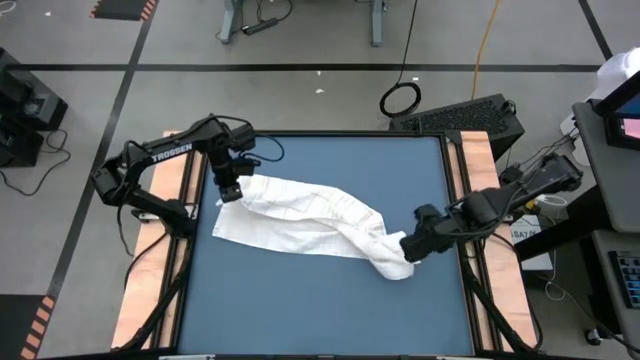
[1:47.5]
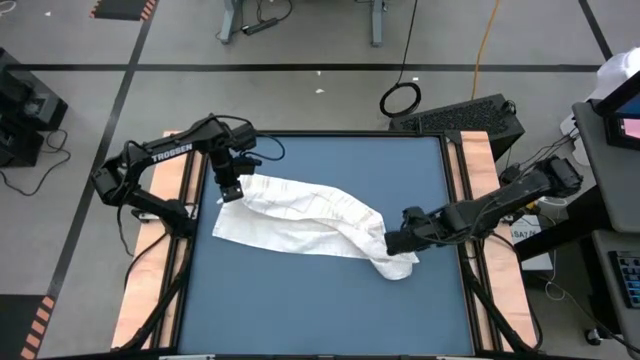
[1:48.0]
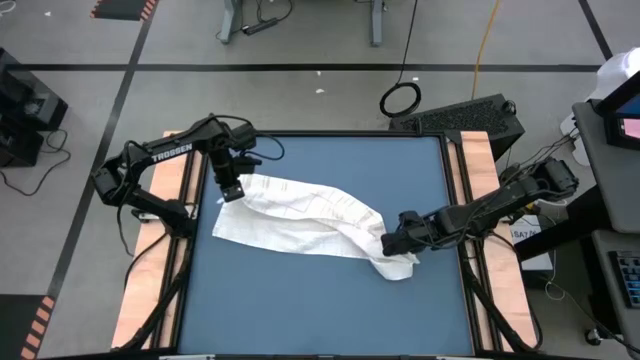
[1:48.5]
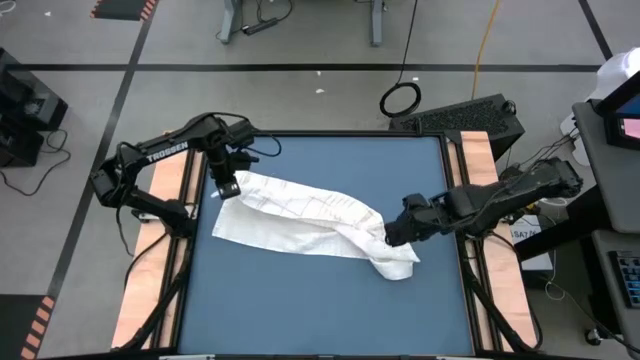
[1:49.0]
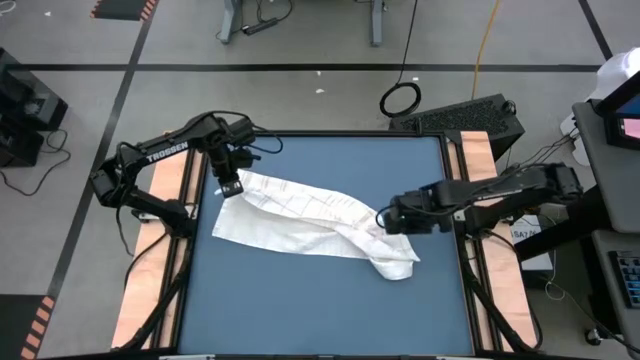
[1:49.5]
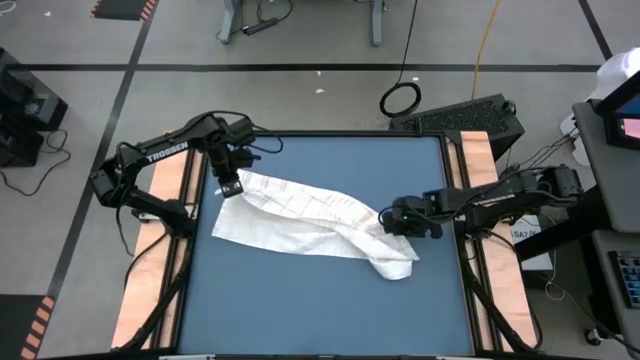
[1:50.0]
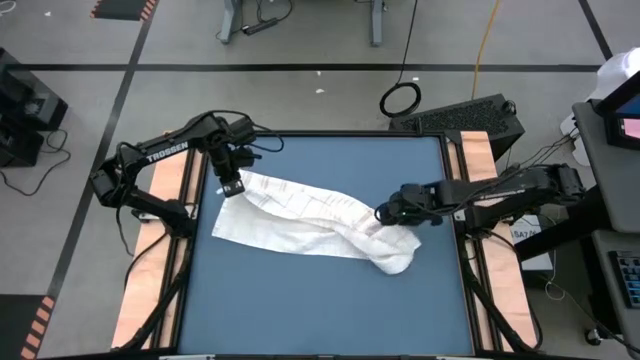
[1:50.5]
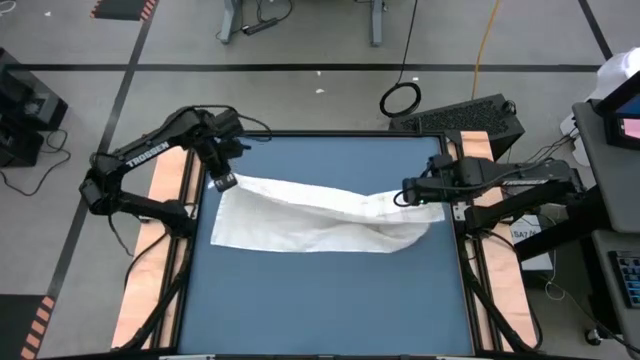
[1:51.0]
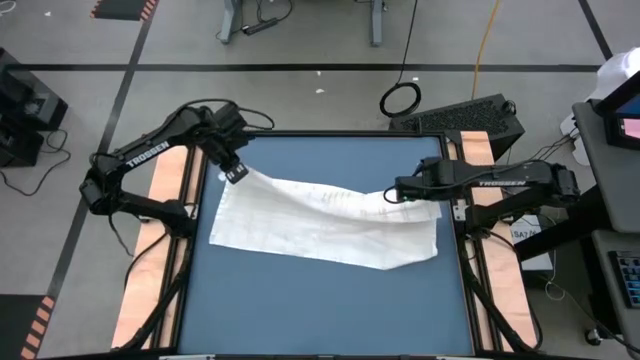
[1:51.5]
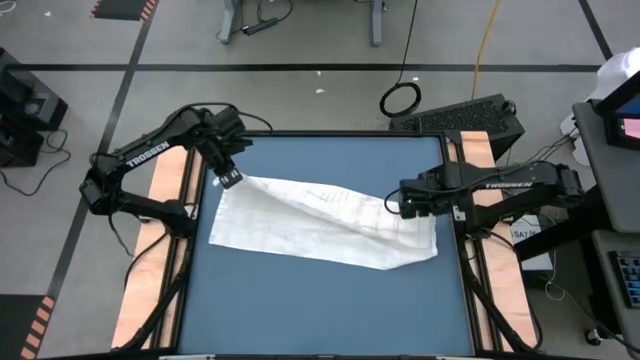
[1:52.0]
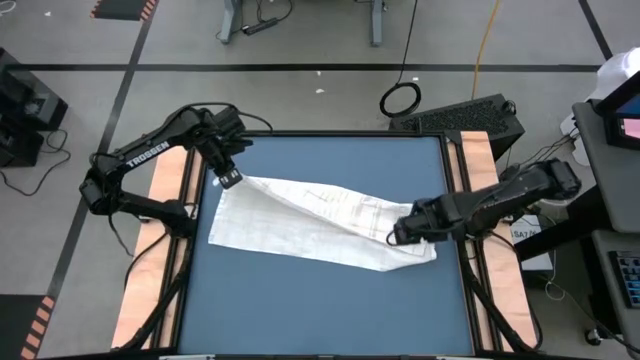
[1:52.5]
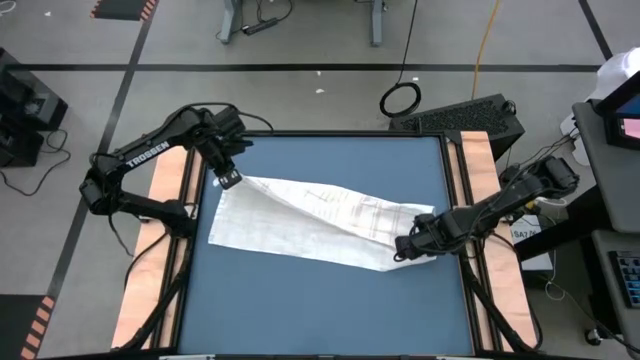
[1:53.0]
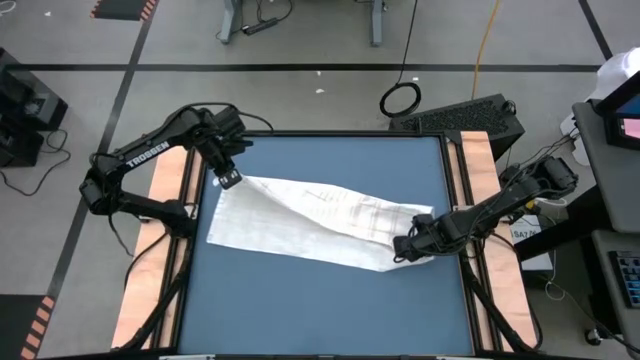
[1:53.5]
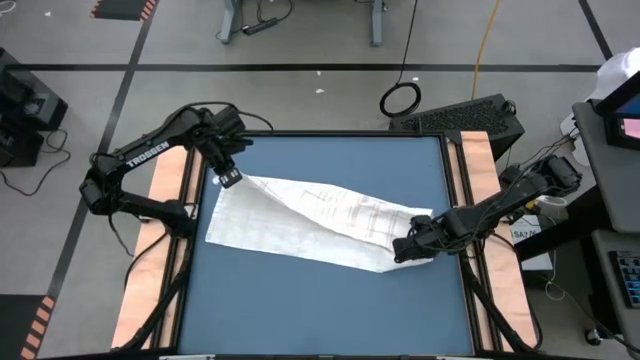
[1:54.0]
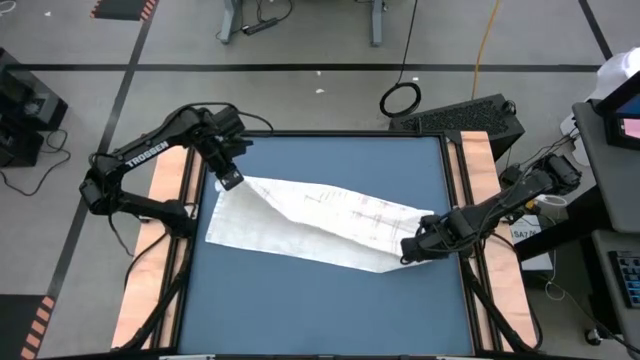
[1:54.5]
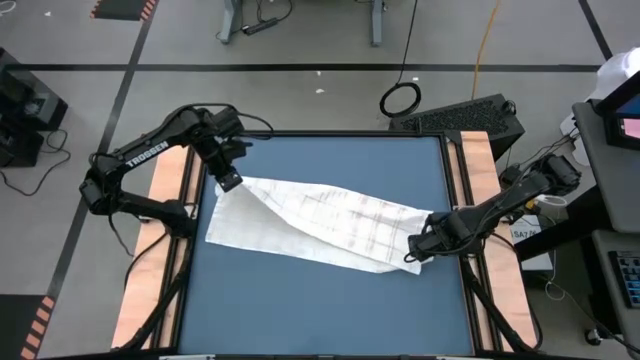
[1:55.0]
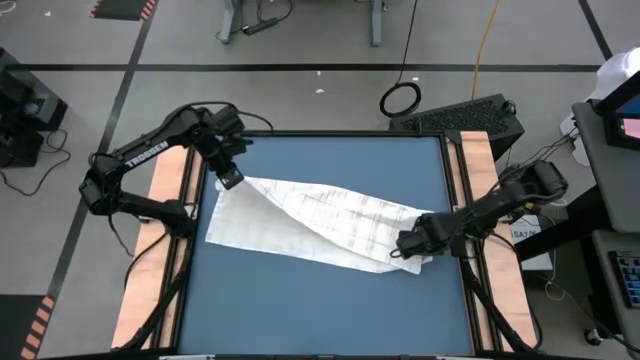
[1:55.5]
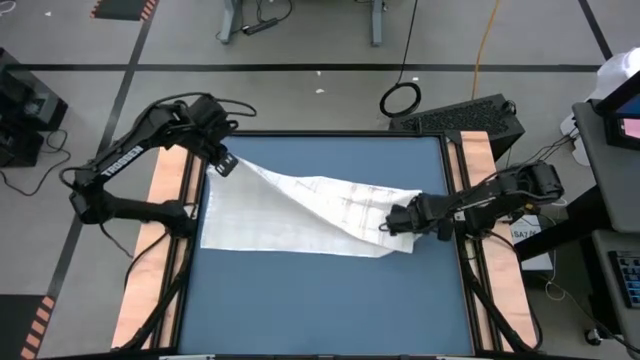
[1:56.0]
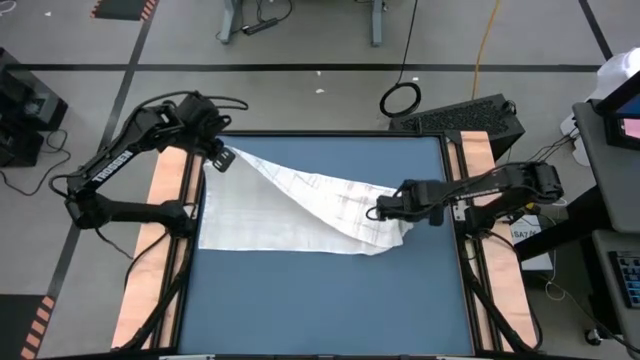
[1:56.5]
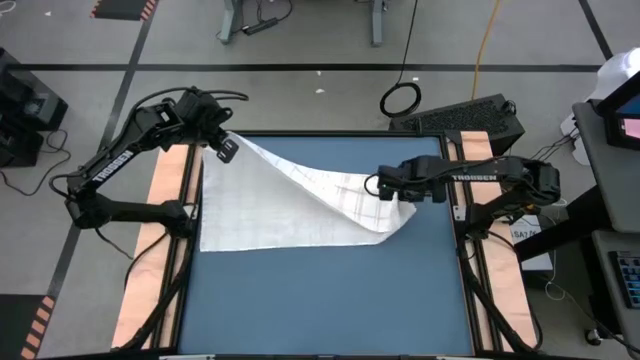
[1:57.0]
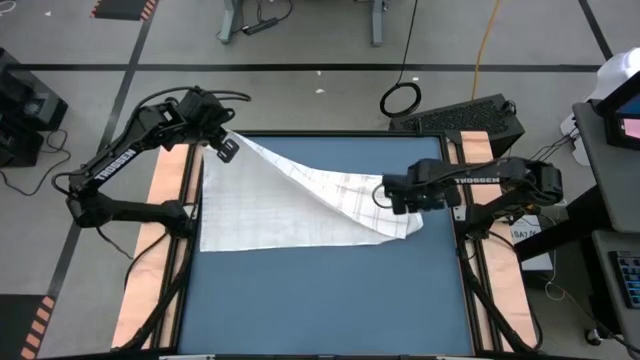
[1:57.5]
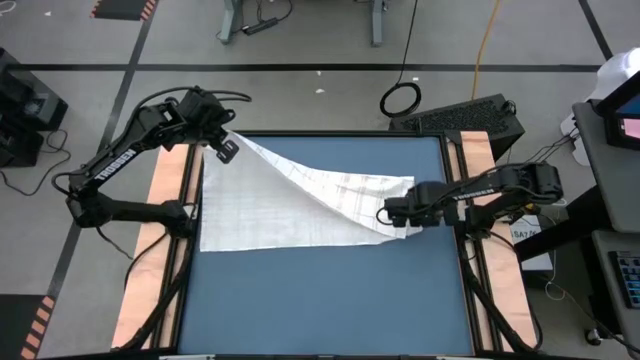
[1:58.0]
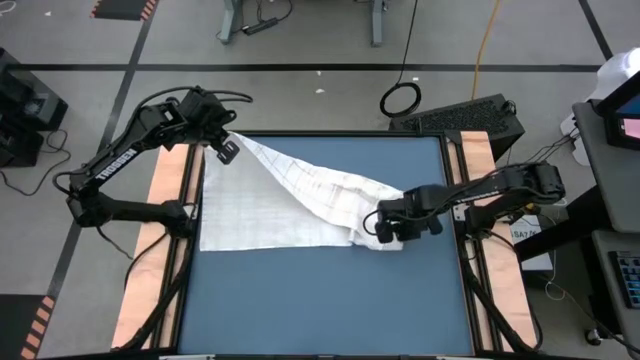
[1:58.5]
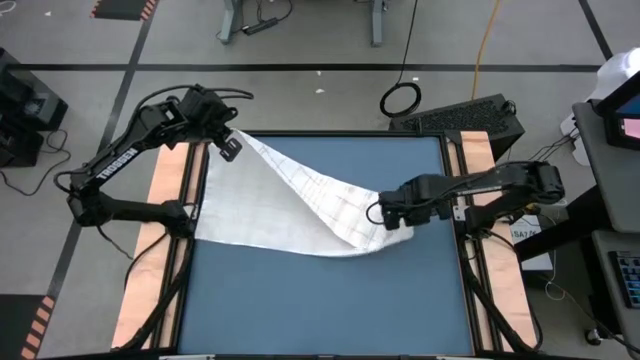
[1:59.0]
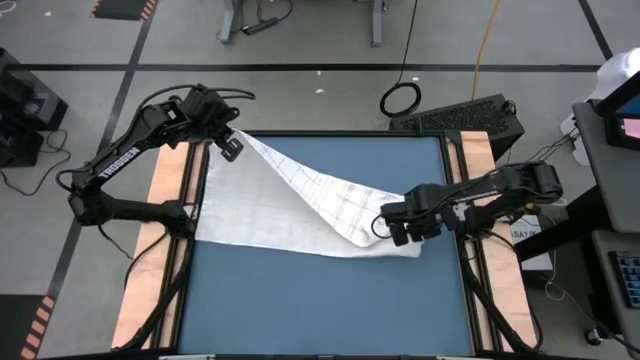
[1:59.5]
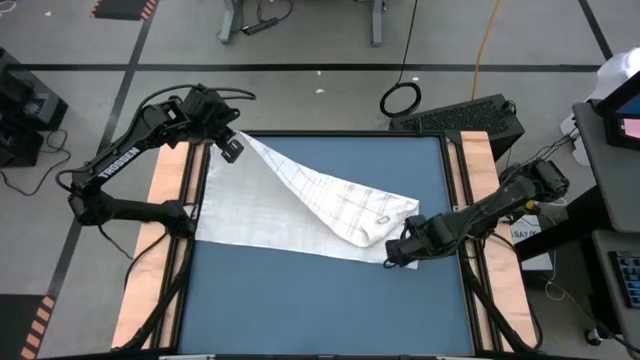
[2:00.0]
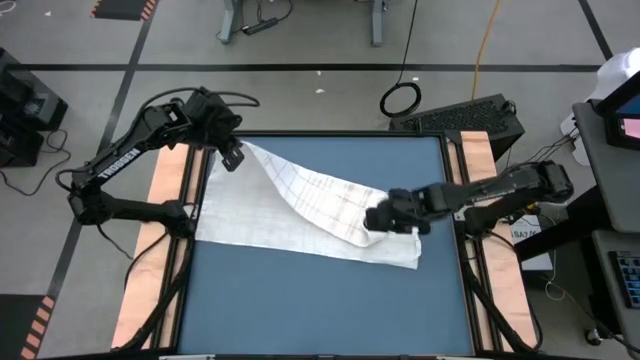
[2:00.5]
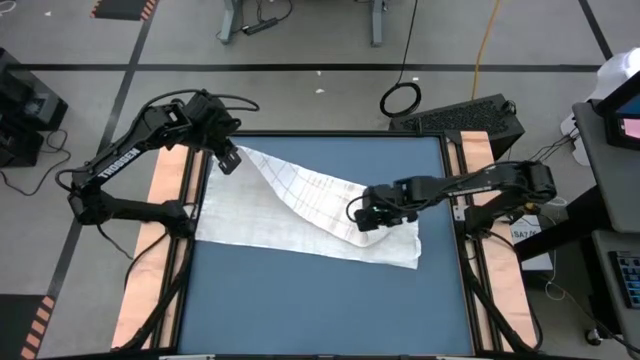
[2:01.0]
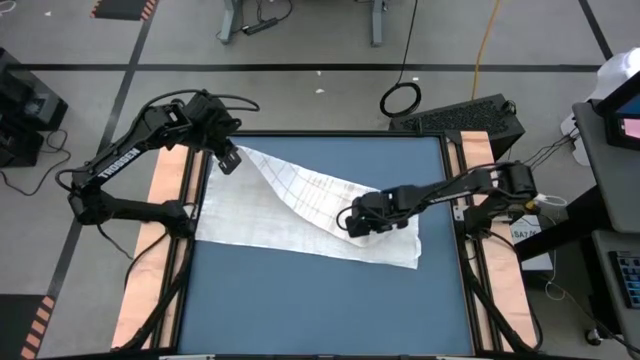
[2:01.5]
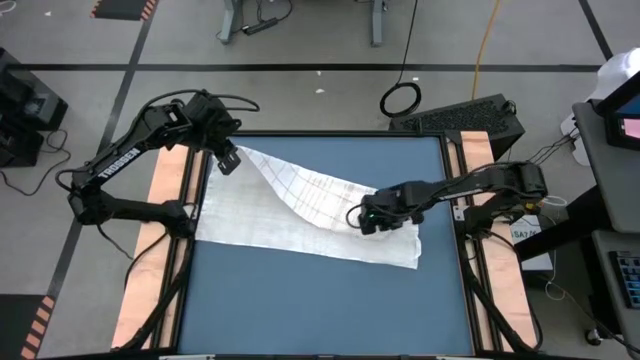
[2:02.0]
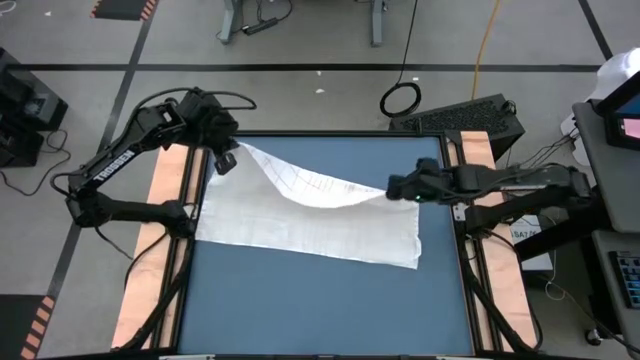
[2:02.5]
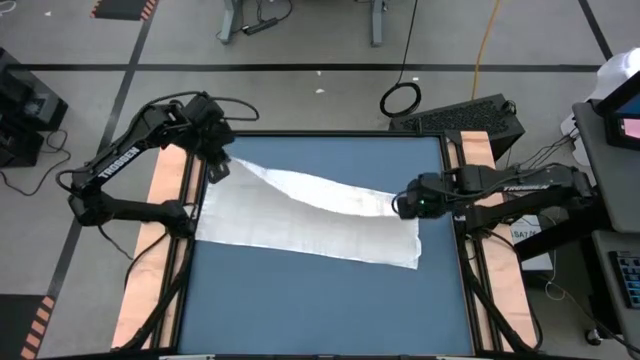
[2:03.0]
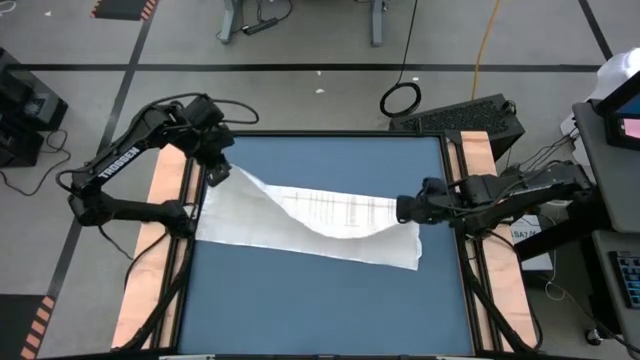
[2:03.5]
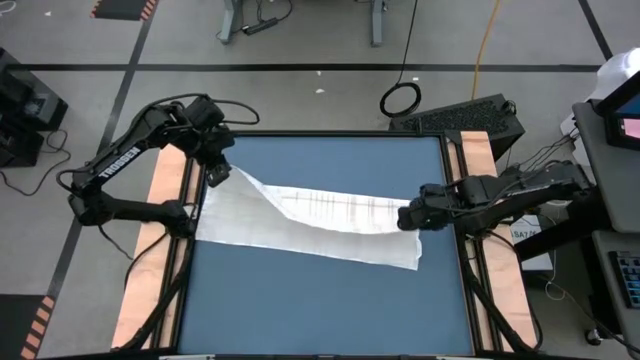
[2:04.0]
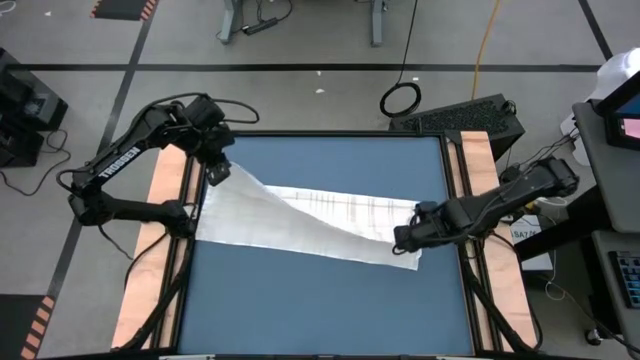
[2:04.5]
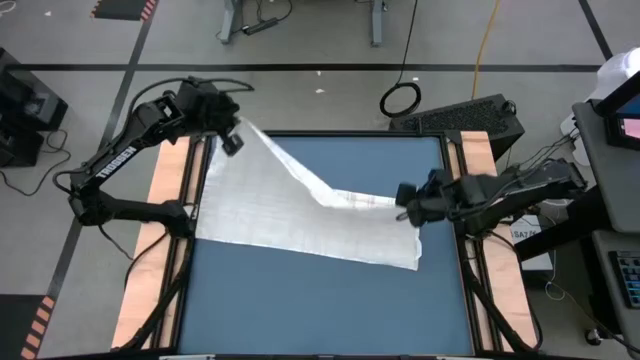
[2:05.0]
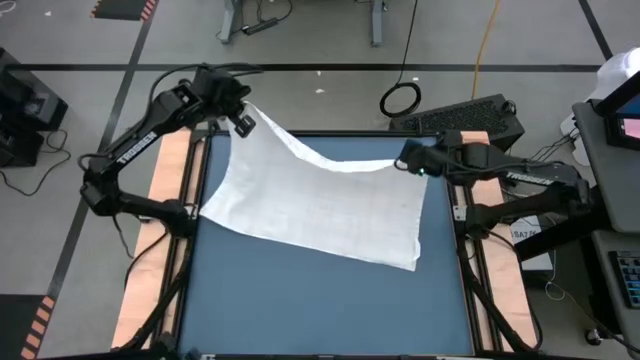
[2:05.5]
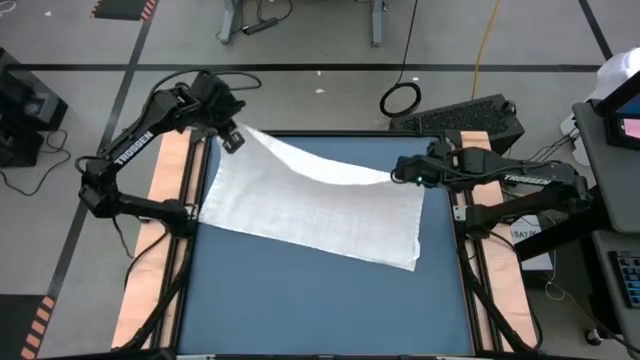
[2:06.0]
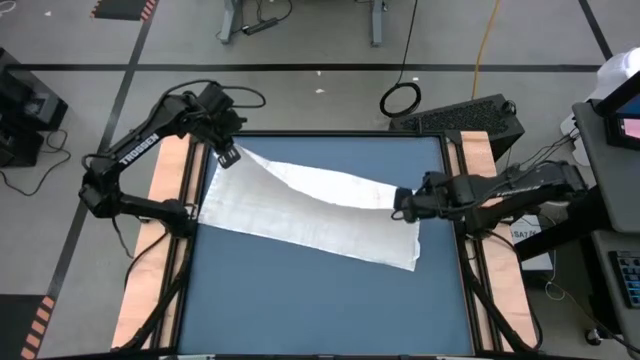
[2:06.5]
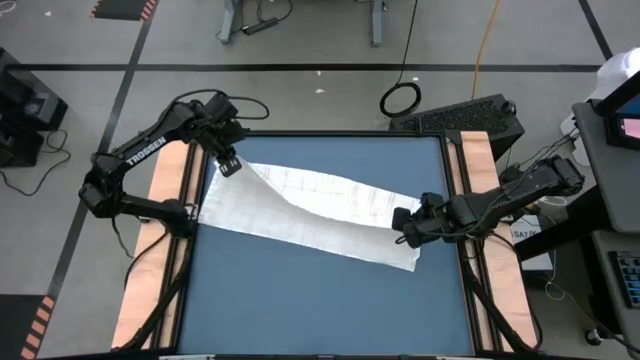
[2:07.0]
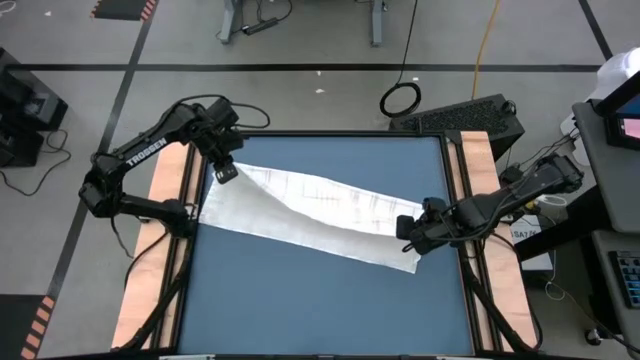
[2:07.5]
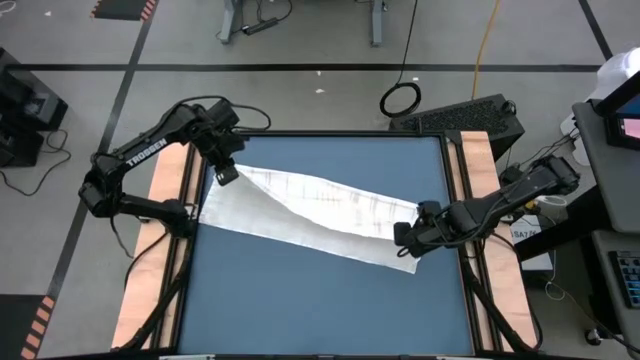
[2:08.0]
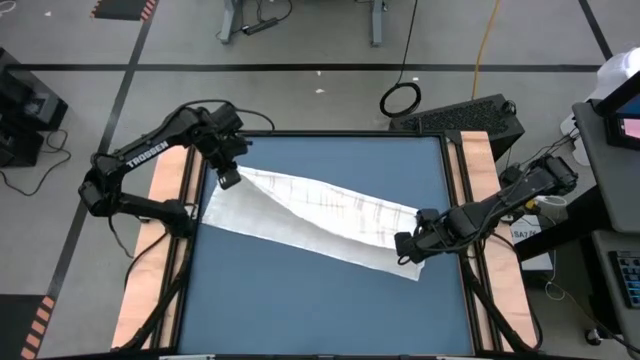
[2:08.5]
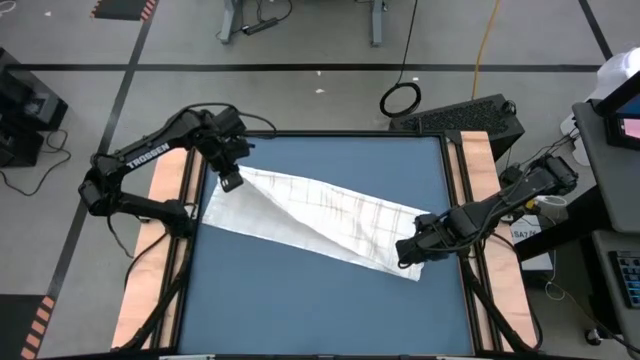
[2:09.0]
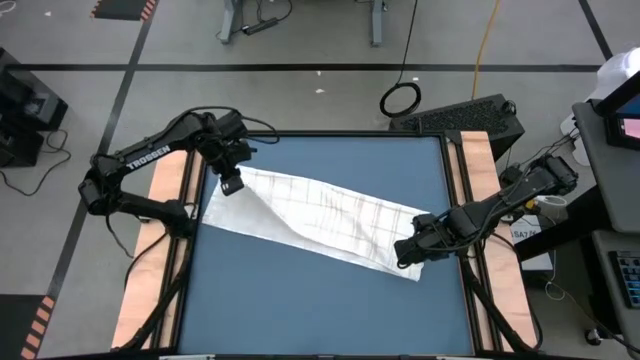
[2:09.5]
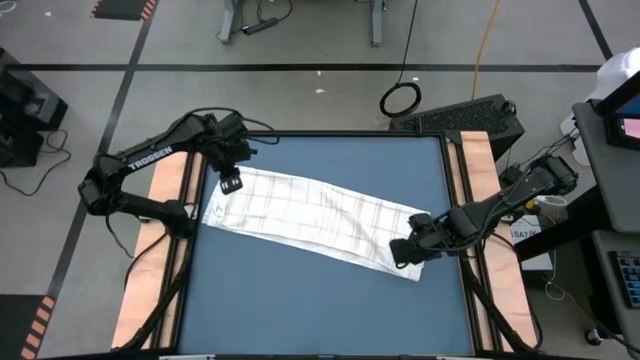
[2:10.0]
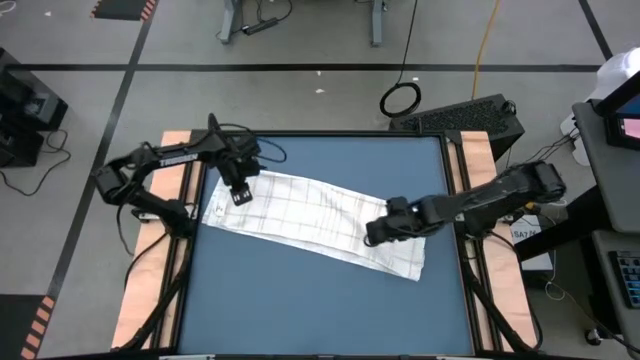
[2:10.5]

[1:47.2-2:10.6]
Task: Roll towel into tight, uniform cylinder
Roll the white towel
